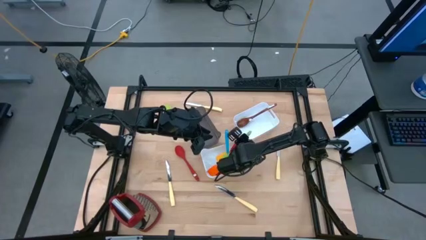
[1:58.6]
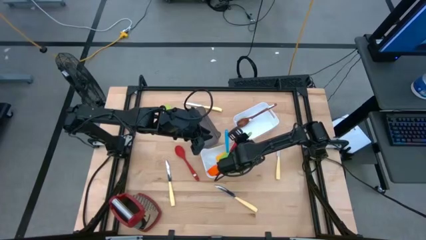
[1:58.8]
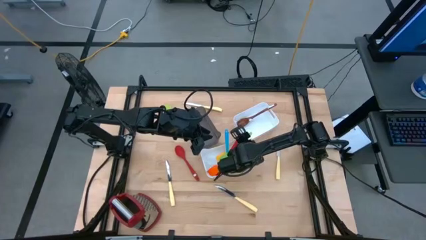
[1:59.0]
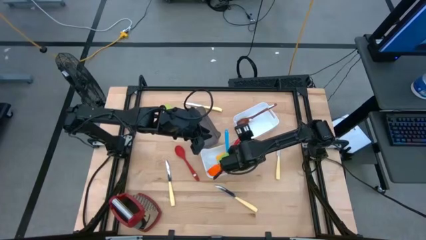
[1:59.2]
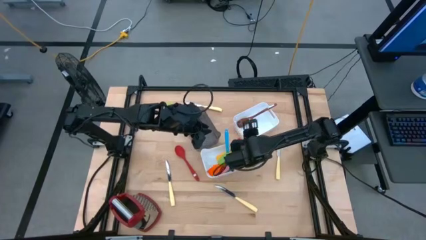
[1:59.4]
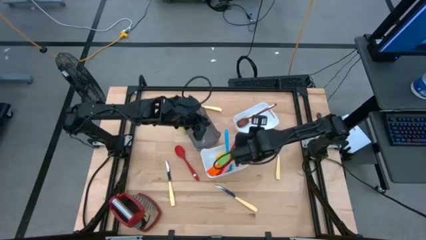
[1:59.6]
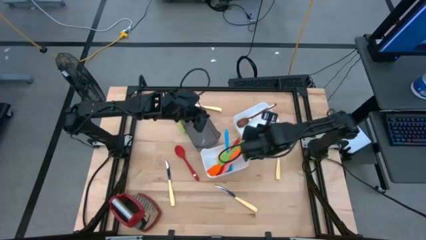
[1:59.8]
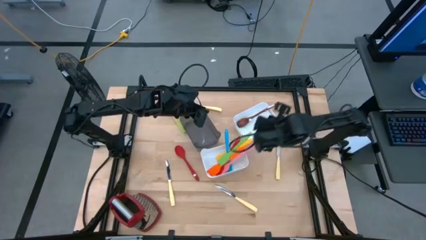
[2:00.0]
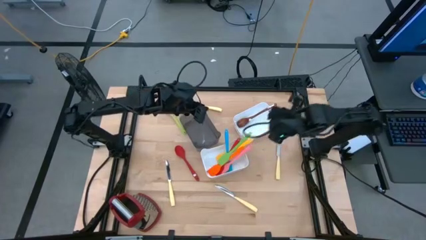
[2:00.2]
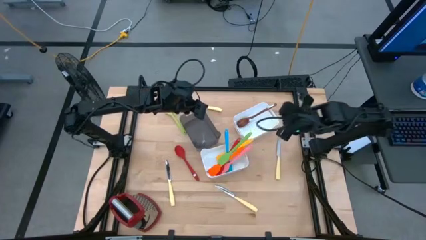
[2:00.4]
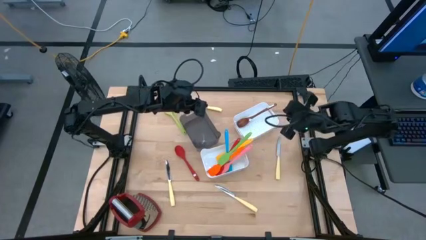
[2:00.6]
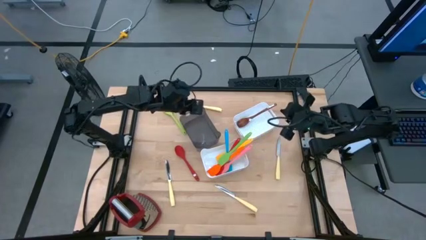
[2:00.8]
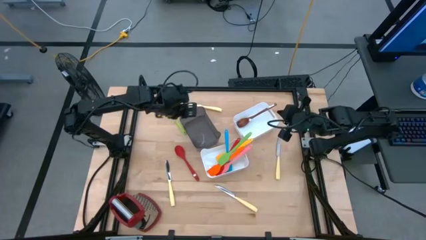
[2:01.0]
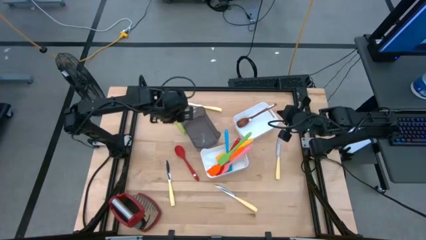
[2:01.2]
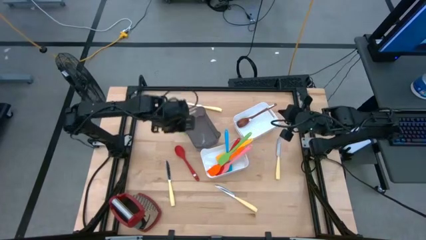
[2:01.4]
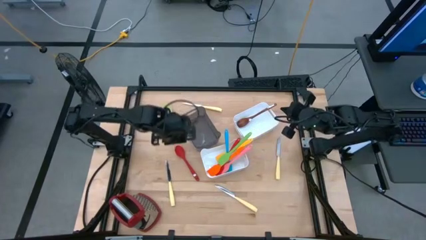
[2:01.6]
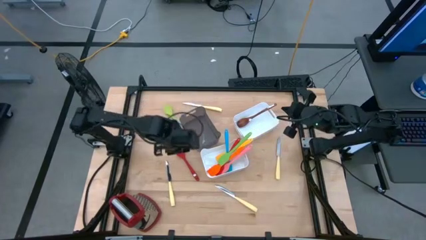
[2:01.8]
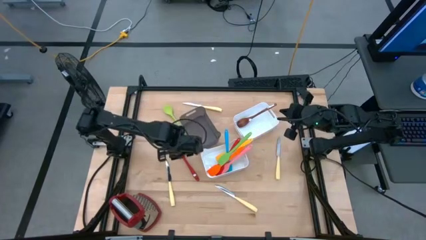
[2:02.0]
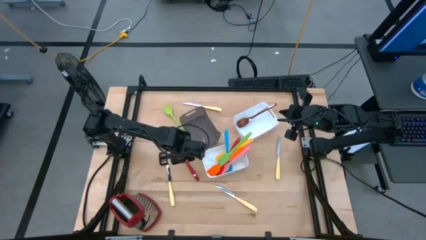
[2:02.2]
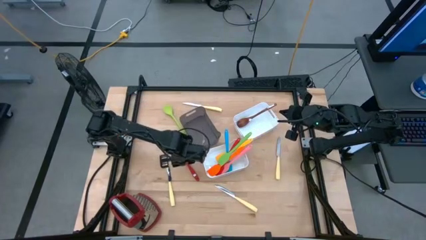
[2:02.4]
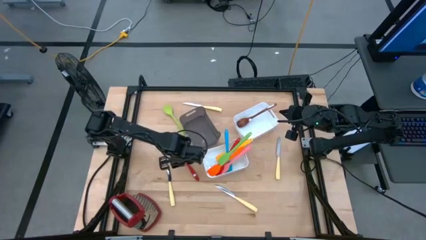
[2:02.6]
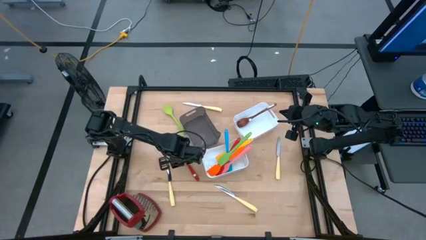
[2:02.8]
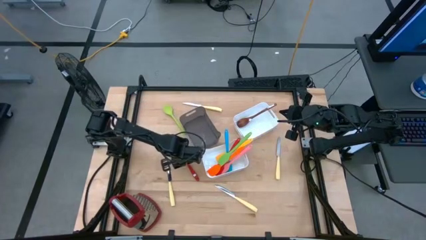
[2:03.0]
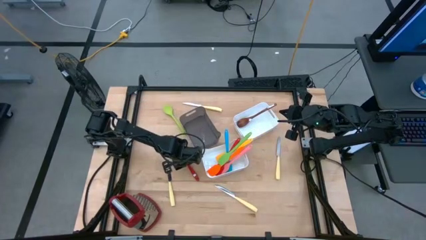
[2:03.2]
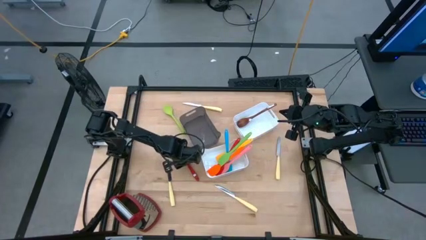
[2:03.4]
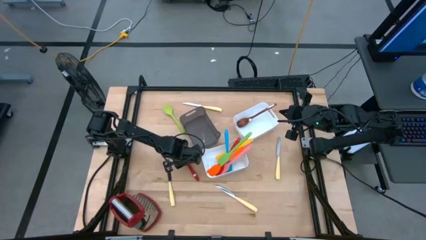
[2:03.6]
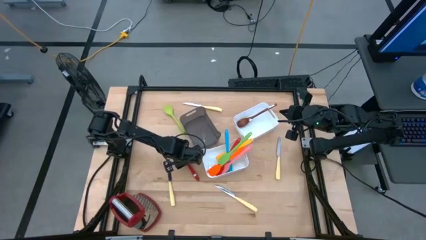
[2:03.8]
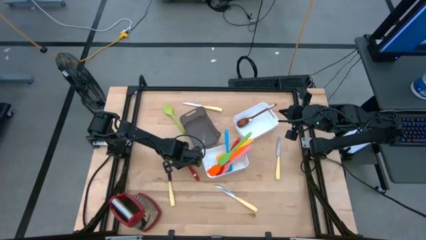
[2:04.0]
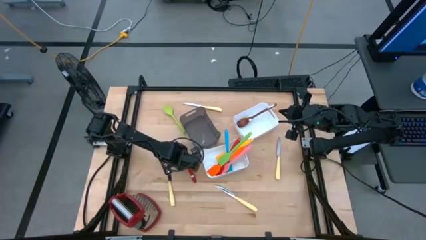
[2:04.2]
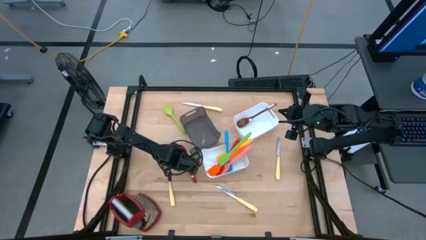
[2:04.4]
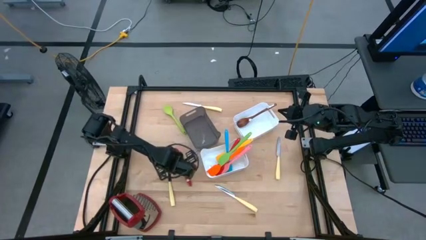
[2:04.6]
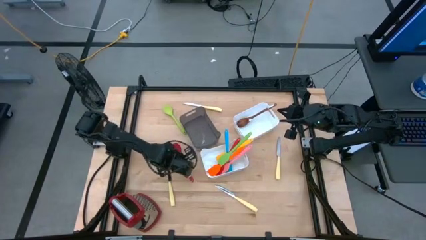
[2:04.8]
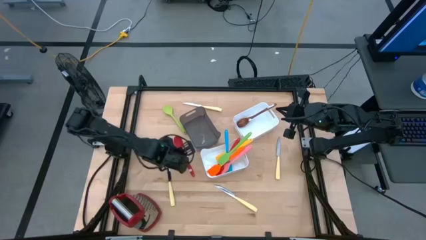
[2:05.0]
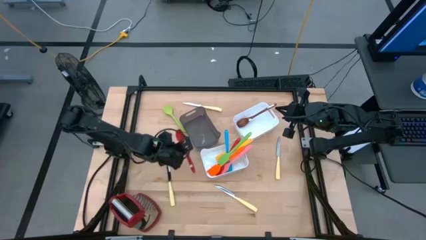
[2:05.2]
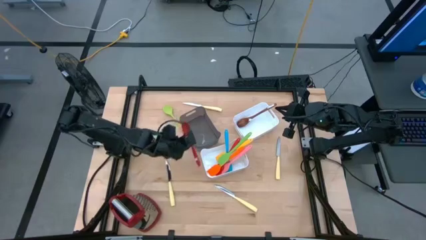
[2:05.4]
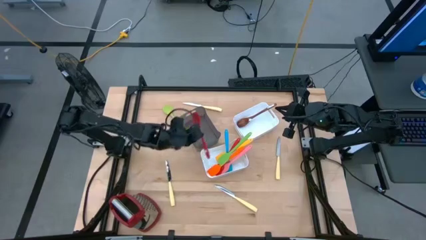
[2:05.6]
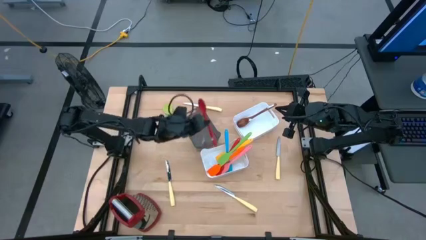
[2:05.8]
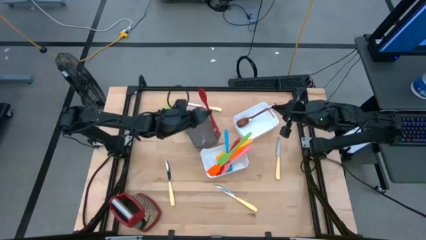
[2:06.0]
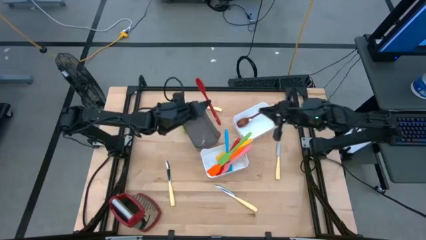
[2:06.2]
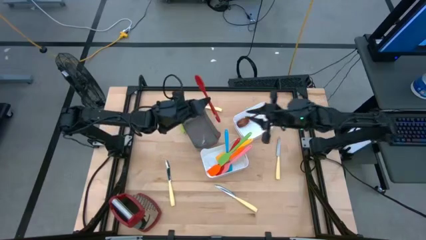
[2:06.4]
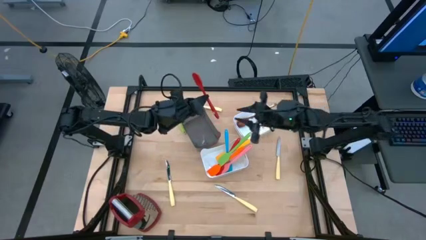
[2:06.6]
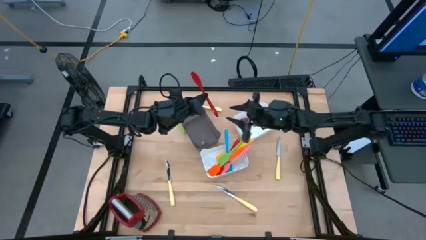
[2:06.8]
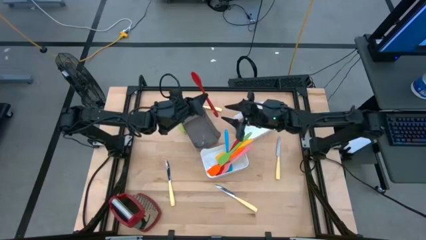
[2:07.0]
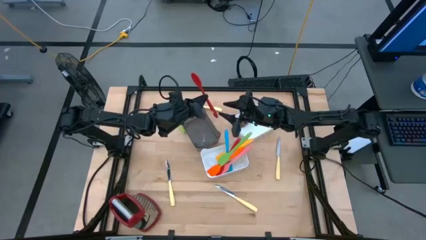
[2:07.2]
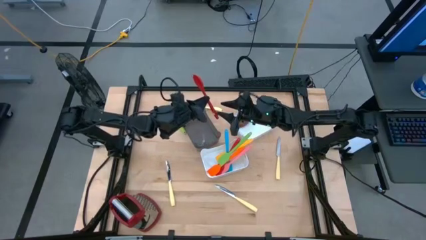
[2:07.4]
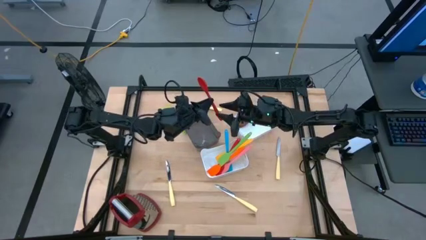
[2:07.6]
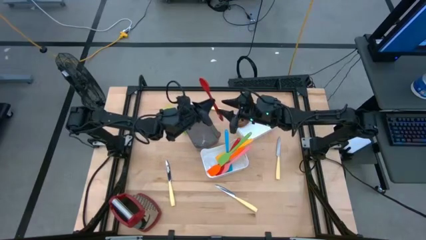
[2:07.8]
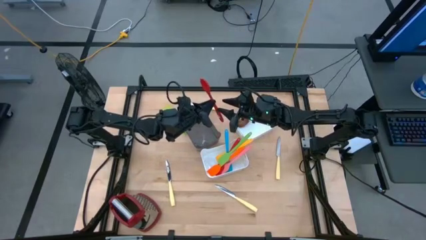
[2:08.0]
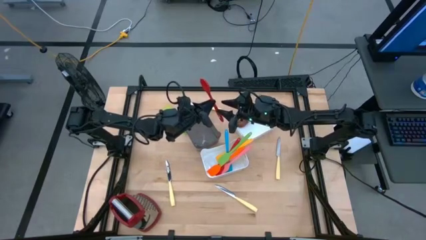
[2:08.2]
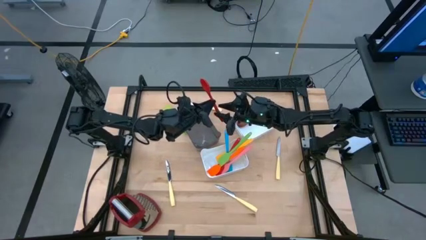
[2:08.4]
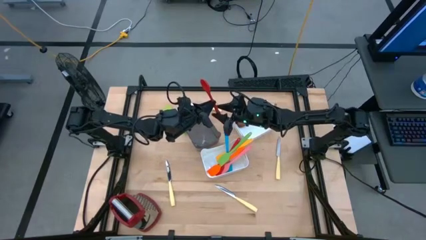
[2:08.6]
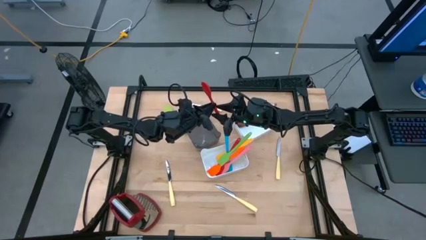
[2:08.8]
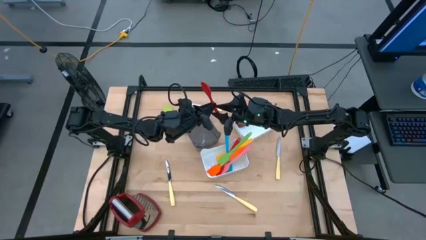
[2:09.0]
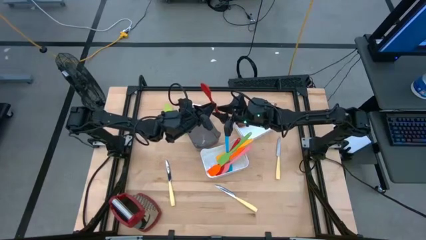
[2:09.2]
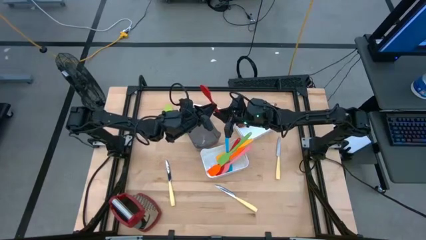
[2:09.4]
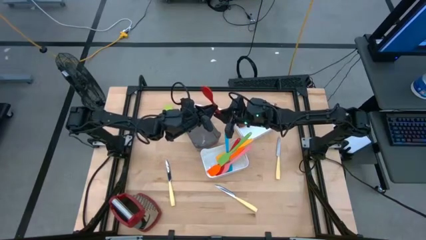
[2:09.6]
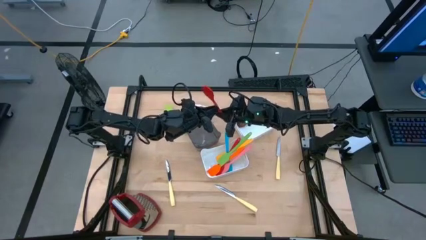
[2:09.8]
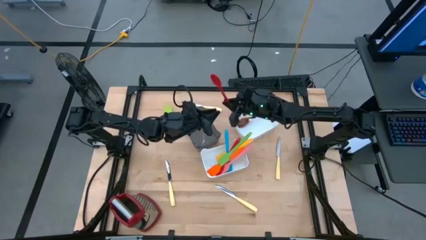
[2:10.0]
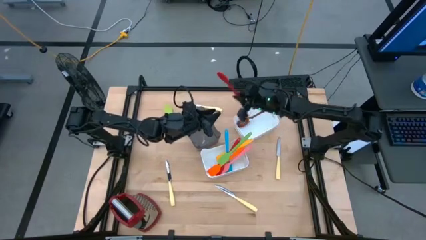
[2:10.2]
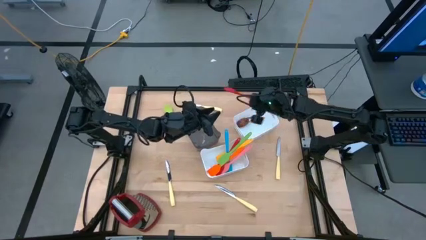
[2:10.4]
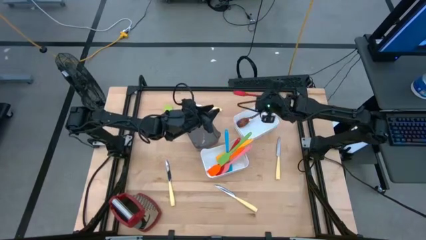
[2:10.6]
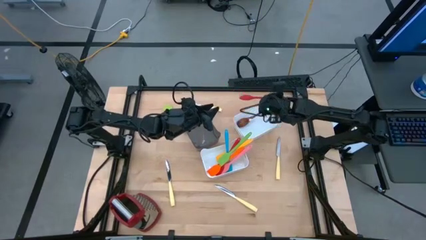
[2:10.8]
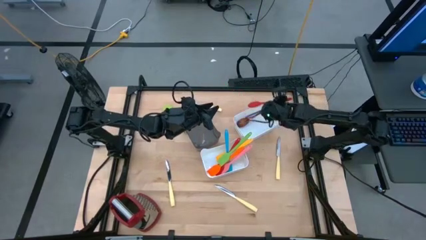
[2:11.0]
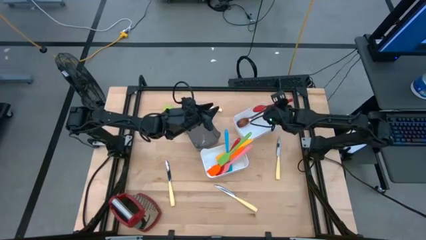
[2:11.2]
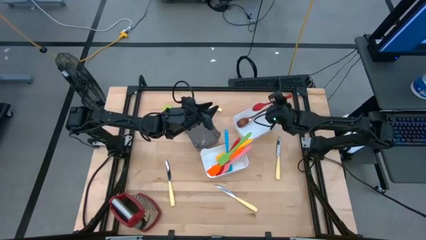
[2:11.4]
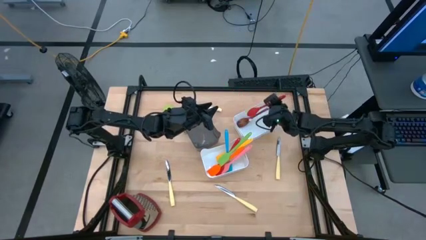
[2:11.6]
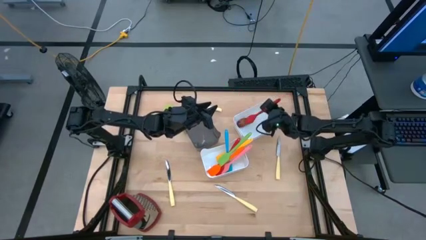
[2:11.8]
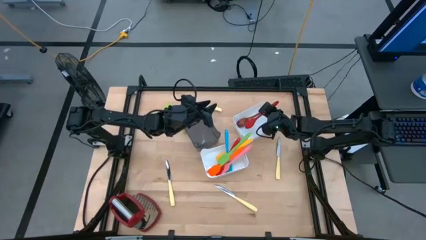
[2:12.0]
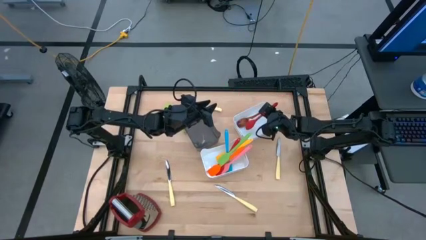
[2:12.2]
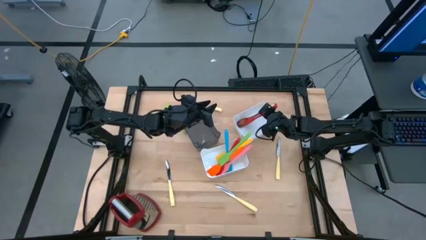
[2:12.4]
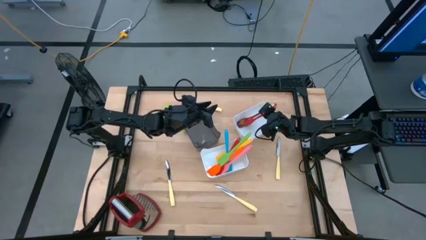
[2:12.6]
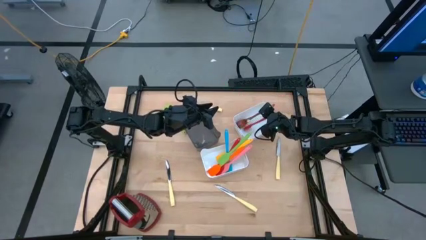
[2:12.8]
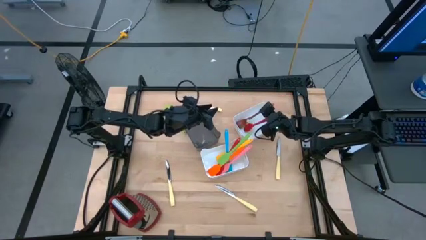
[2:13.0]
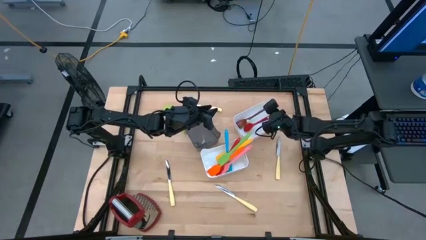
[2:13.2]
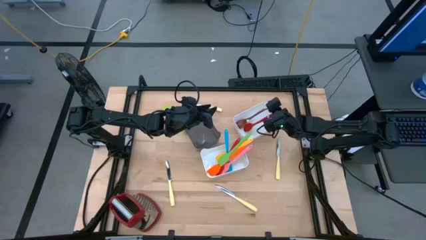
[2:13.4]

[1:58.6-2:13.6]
Task: Pick & Place Kitchen Items
Put the red spoon into the top white bin

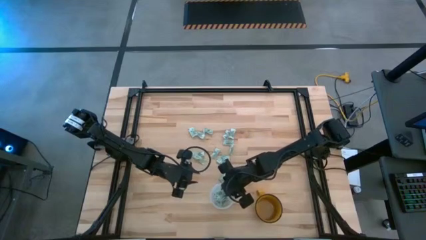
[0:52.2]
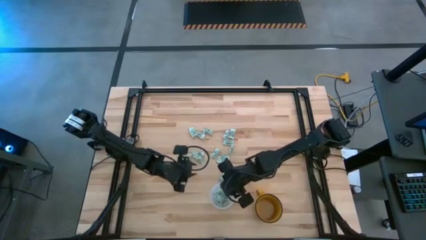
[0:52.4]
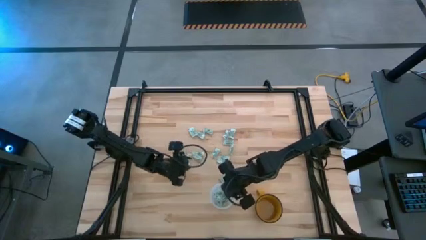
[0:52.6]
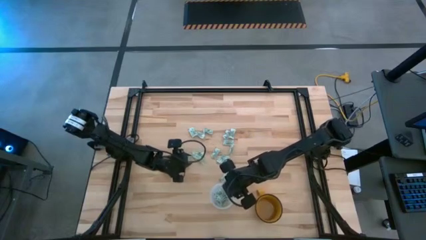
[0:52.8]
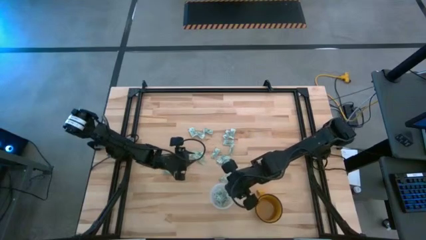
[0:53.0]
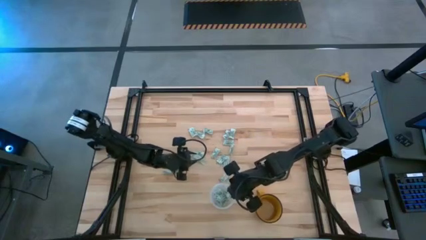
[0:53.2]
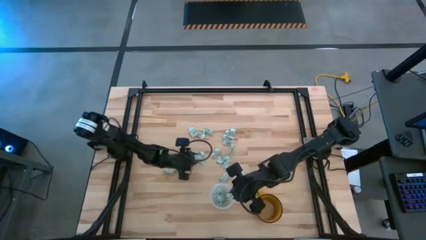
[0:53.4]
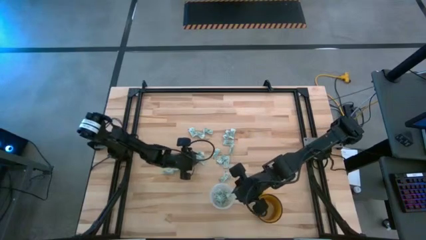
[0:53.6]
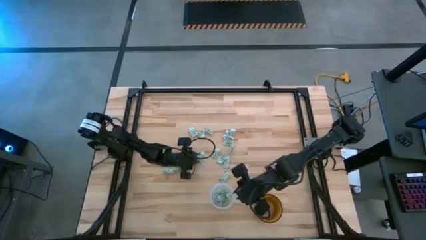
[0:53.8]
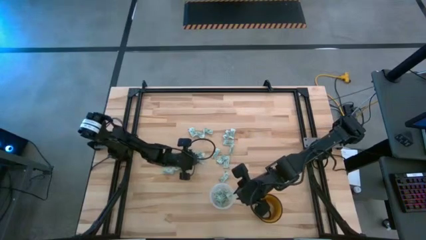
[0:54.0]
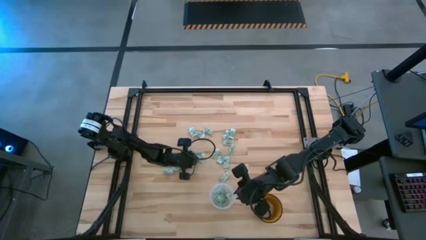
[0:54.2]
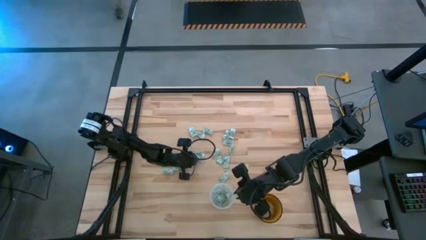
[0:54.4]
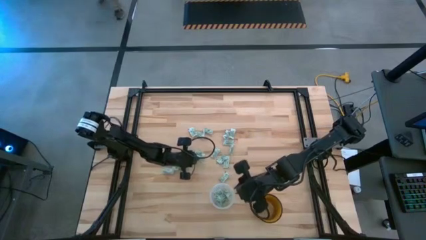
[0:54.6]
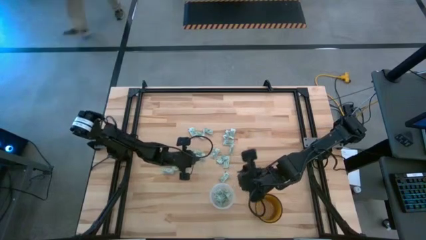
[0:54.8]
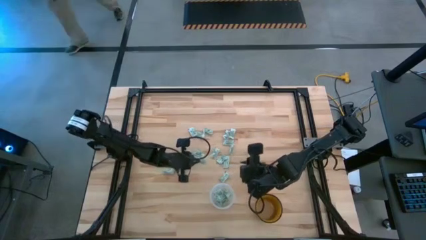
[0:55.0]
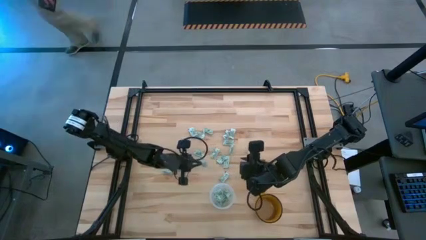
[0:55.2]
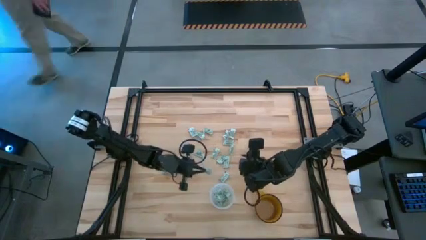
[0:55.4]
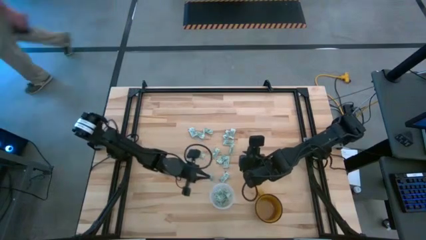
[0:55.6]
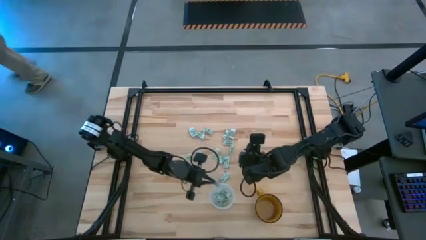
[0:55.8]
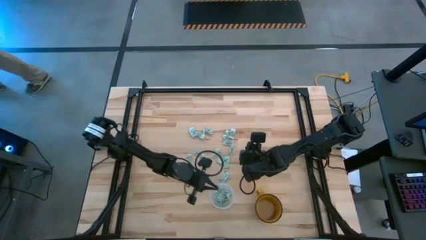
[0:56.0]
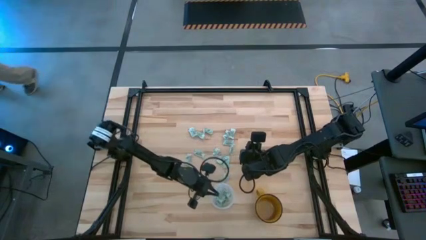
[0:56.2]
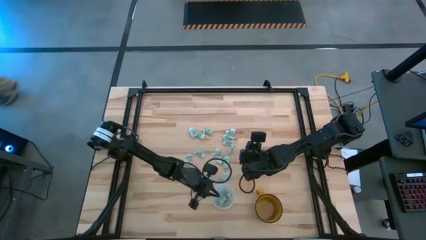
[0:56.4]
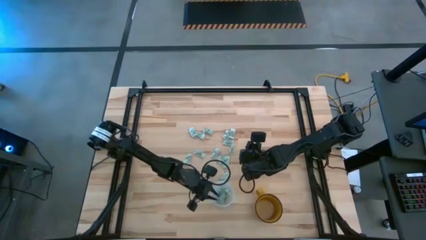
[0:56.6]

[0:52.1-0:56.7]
Task: Pick and place Stevia / Truvia into bins
Put the stevia packet into the transparent bin
